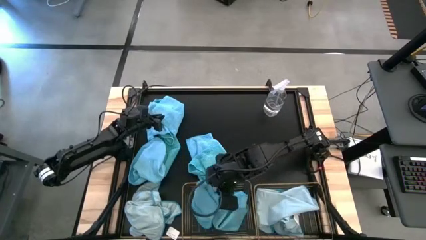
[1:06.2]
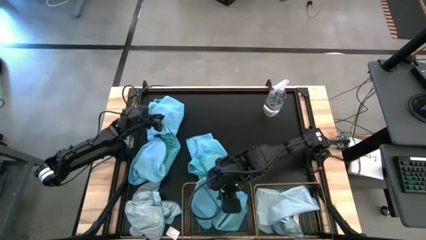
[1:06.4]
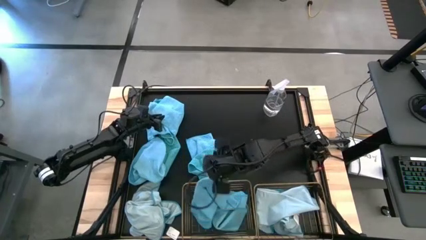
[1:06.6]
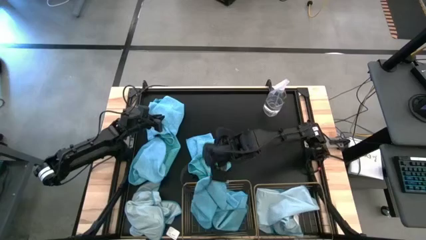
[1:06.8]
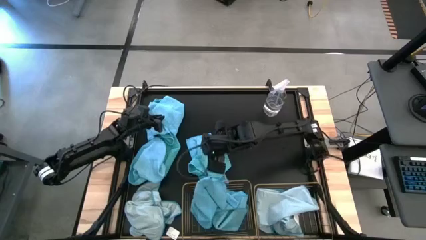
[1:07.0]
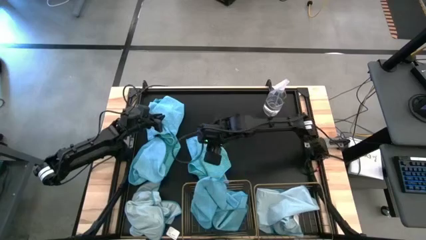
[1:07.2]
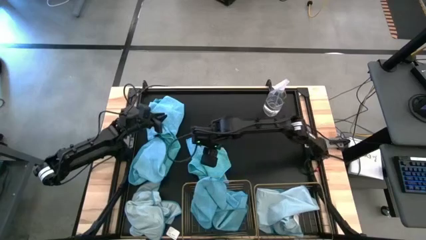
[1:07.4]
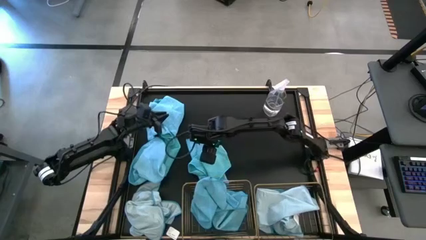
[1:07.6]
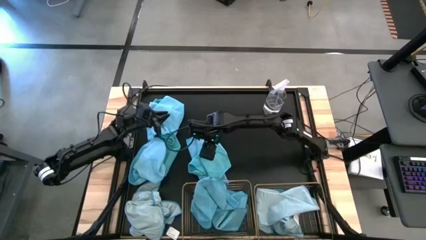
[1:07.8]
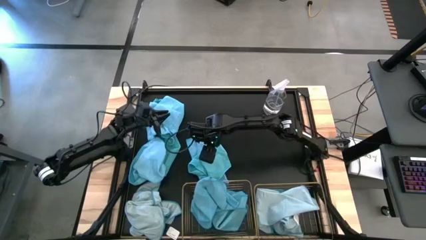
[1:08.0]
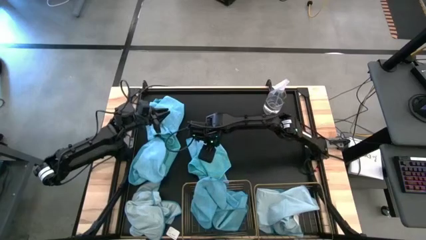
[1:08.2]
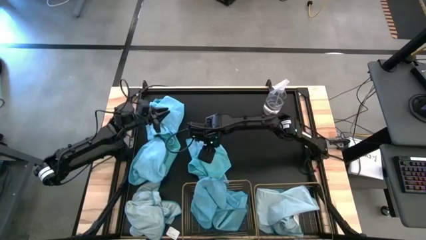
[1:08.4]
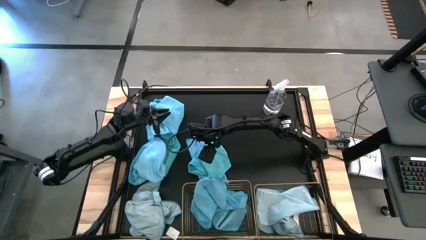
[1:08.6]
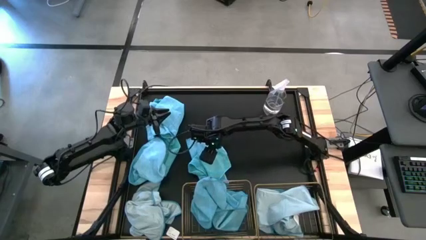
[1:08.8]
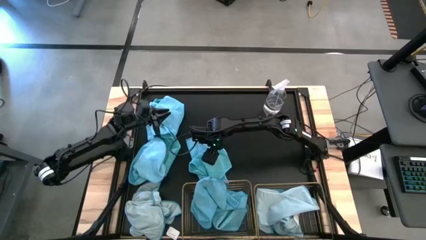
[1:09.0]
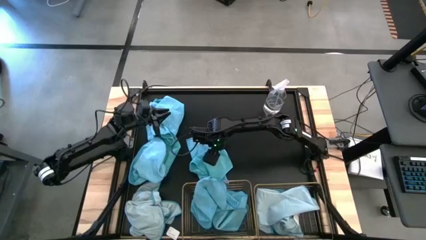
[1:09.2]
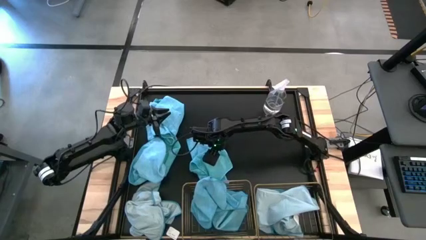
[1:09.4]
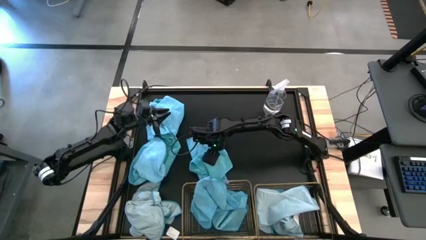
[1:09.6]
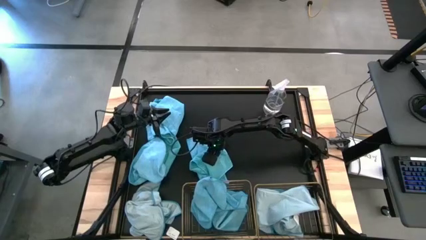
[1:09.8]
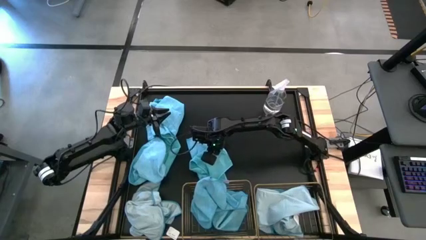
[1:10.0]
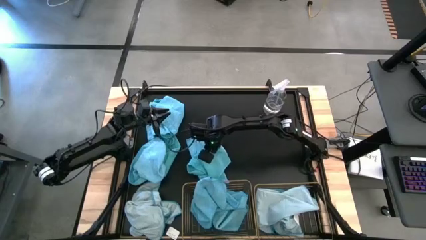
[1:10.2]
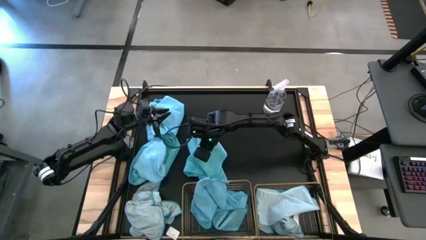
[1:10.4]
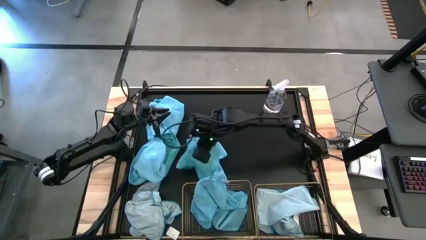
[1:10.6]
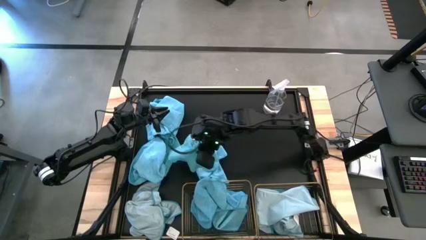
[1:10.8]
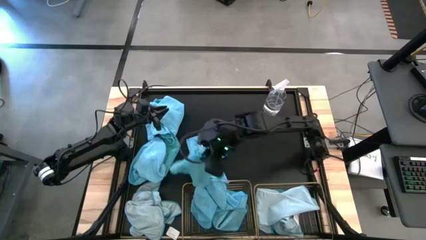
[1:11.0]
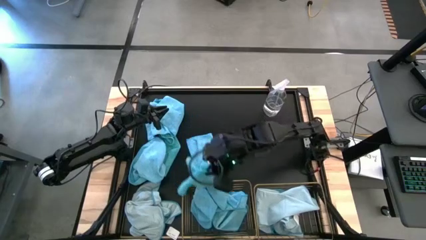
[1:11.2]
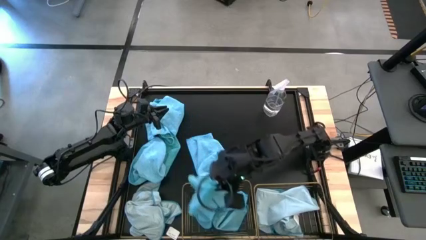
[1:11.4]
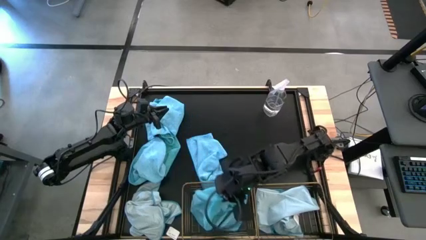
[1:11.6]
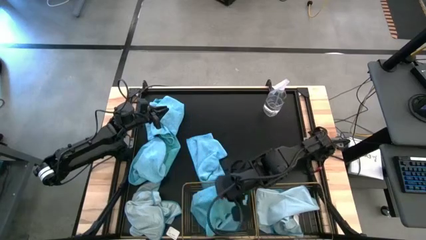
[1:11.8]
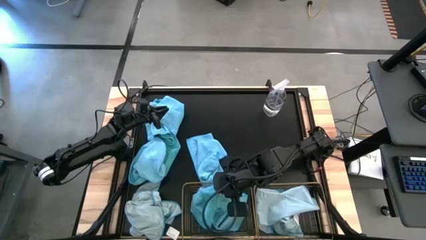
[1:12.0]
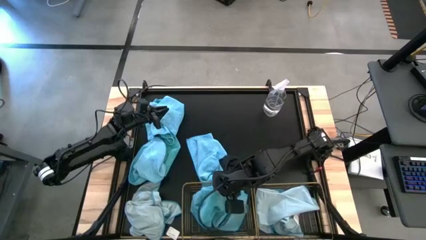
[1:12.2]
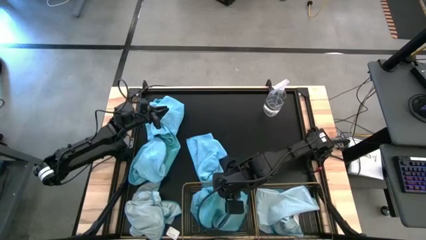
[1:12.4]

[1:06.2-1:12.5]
Task: Sort microfiber towel by color & place in baskets
Put the blue towel into the left wire basket

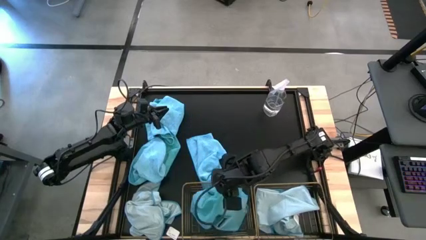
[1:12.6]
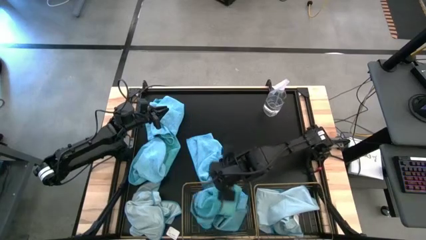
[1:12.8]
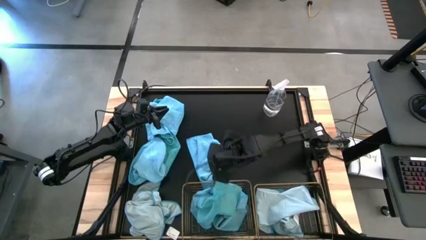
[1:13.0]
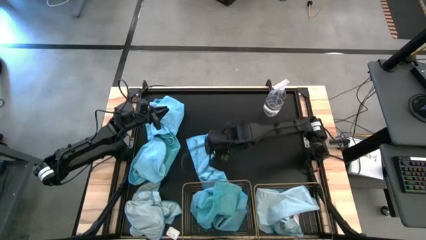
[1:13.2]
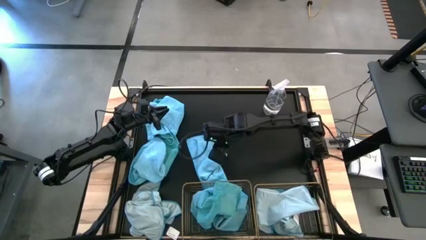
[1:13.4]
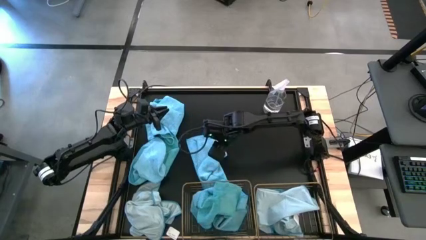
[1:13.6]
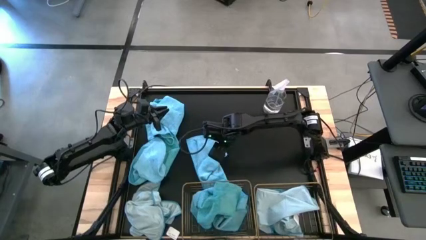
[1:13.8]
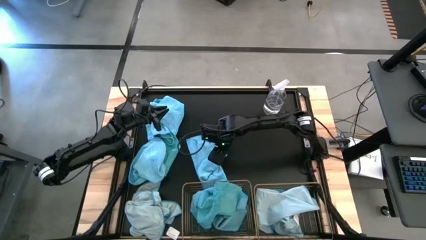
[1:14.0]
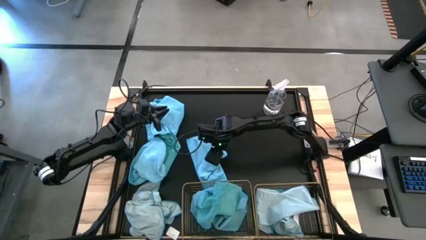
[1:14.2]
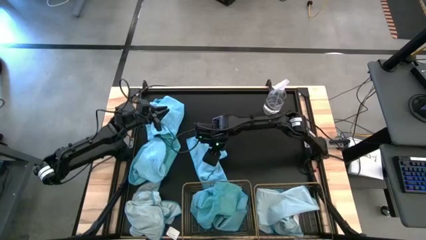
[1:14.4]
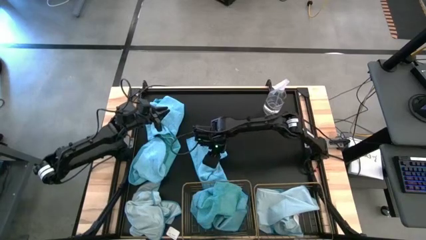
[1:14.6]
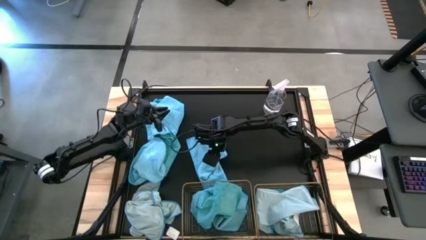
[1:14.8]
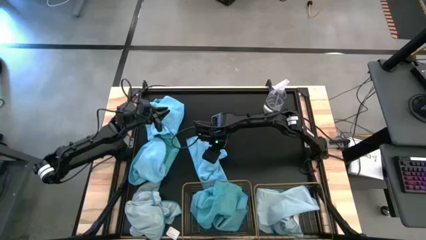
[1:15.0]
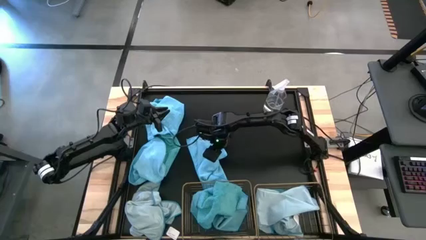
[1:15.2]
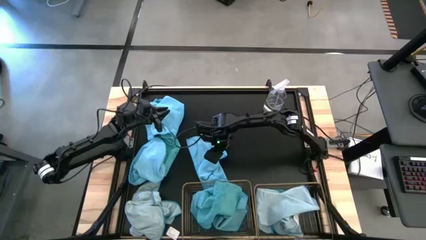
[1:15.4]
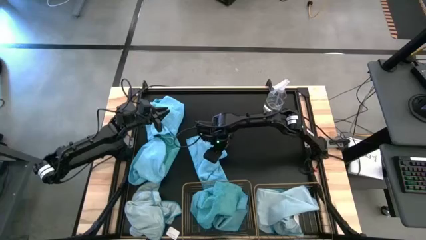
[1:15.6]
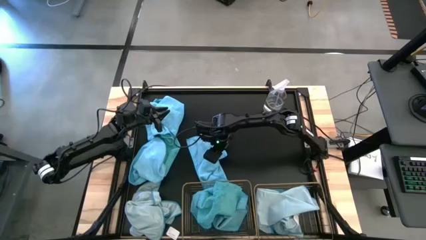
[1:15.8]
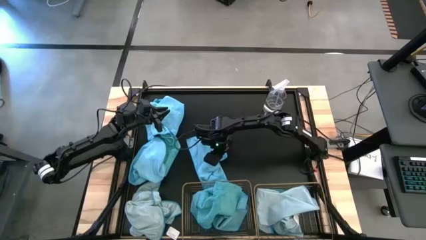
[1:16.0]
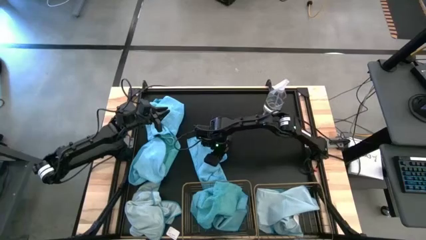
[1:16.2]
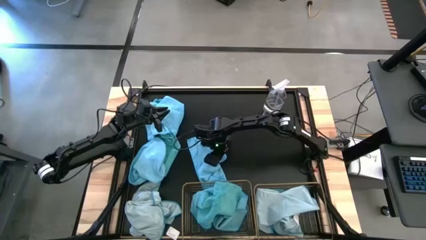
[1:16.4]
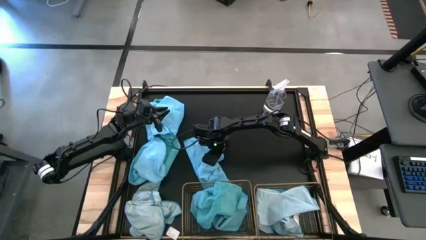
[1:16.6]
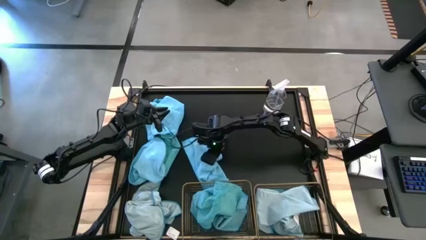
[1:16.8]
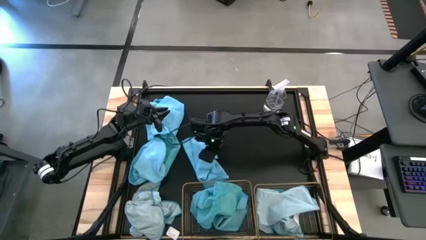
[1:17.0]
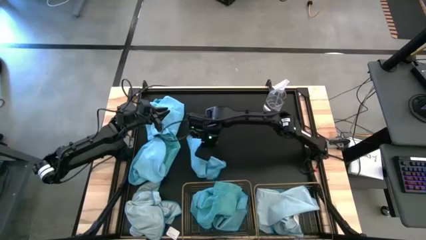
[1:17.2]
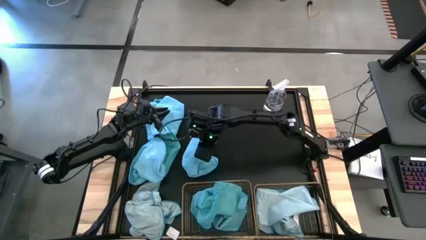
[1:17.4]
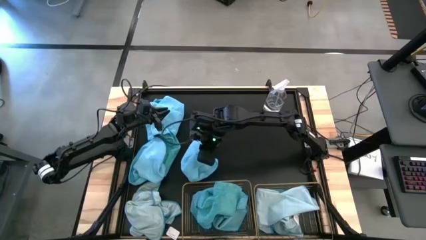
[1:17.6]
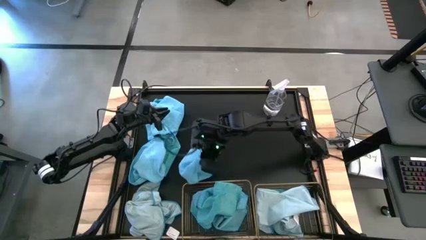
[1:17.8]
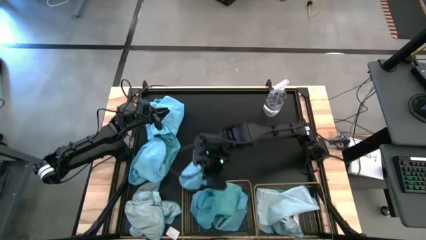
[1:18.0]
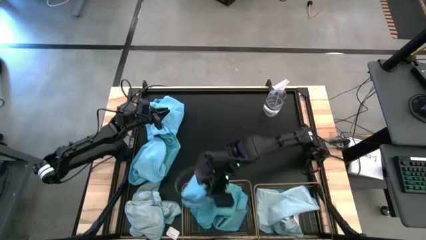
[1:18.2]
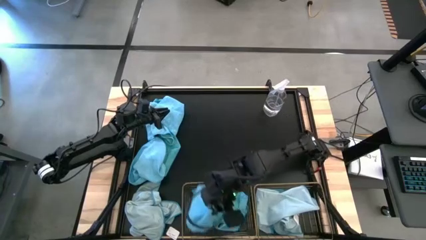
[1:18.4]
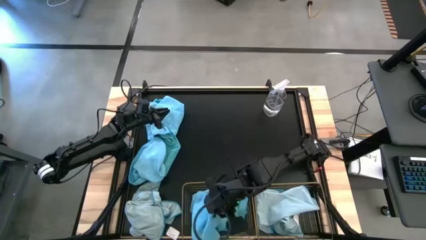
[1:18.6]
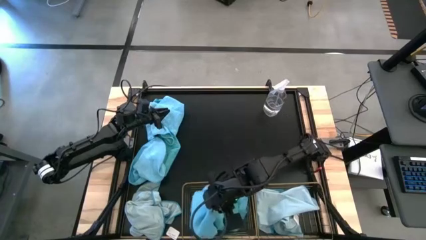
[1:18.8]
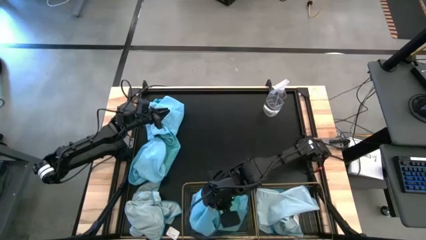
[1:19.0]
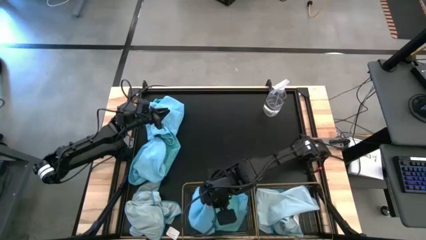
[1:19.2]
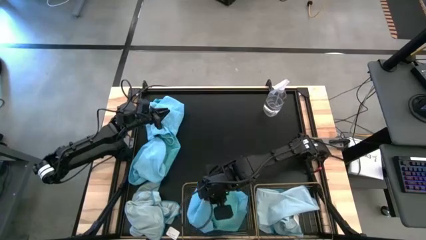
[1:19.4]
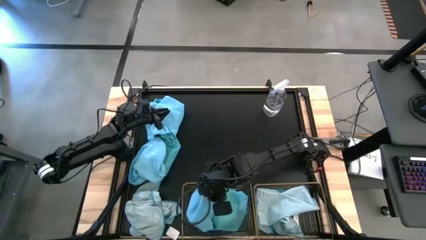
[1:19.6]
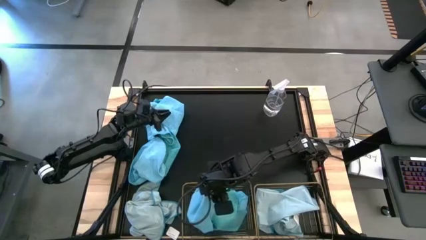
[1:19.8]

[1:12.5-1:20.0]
Put the blue towel into the left wire basket
